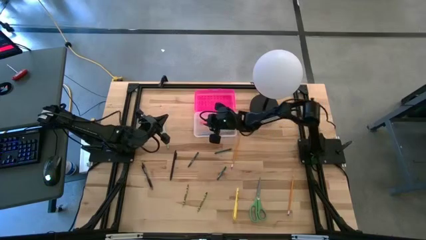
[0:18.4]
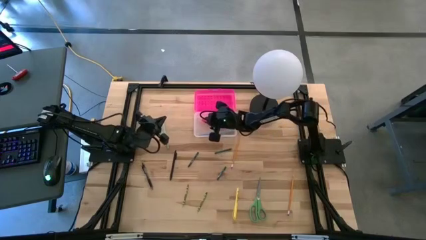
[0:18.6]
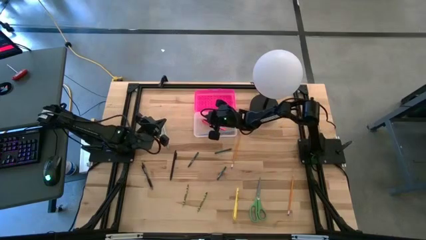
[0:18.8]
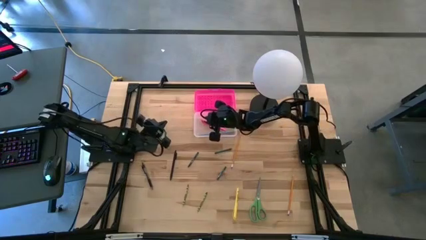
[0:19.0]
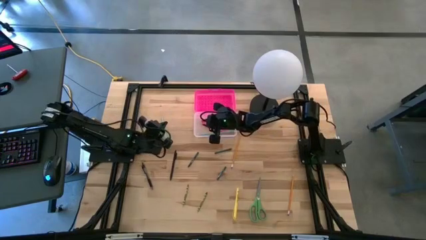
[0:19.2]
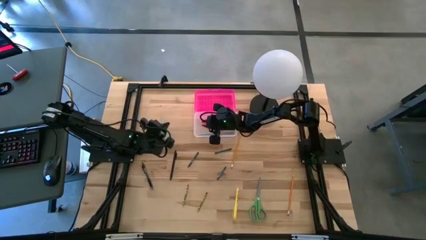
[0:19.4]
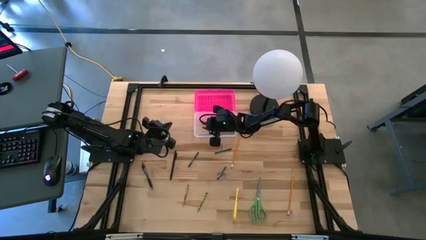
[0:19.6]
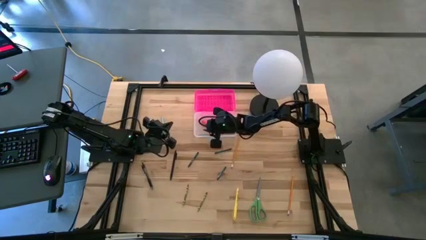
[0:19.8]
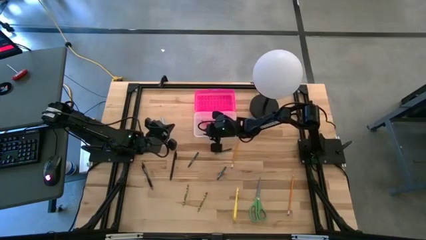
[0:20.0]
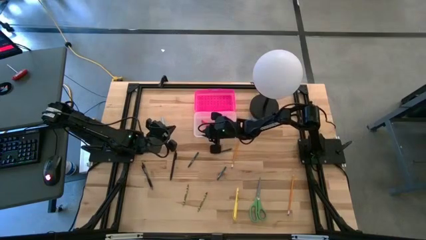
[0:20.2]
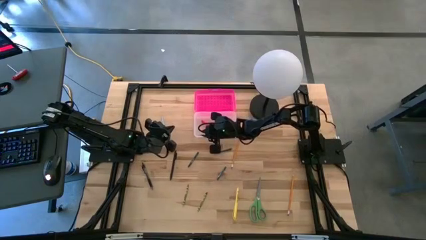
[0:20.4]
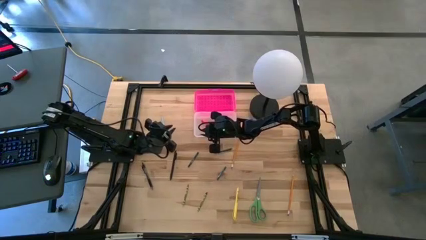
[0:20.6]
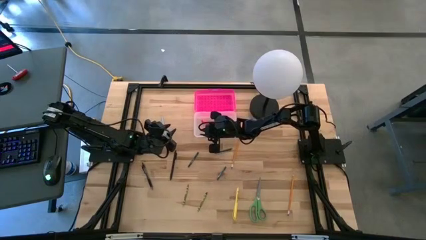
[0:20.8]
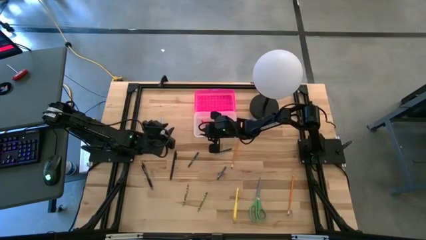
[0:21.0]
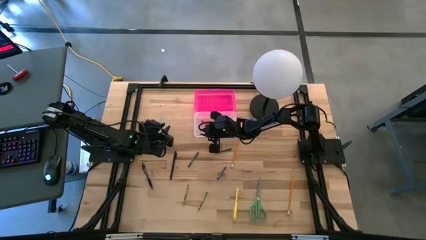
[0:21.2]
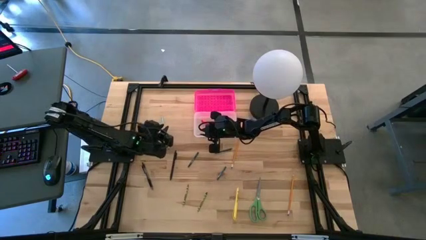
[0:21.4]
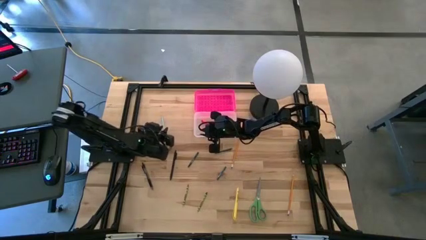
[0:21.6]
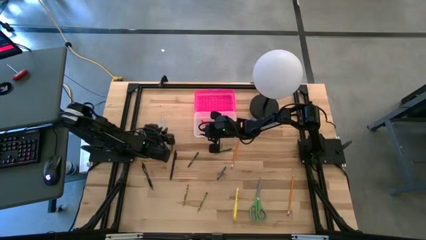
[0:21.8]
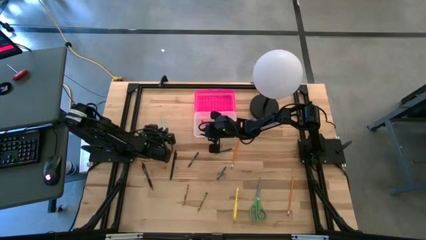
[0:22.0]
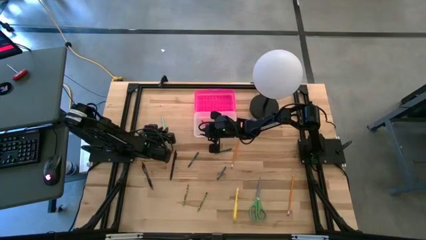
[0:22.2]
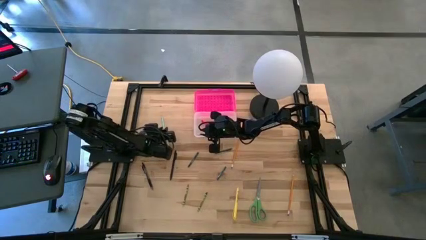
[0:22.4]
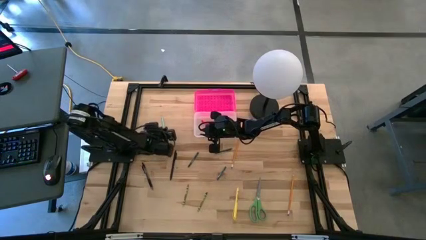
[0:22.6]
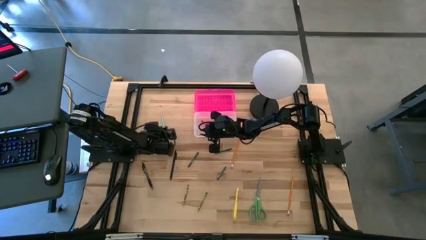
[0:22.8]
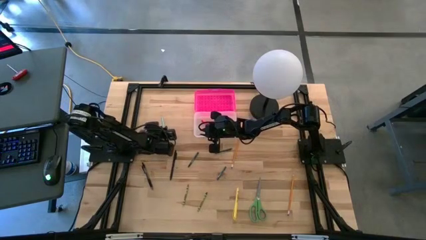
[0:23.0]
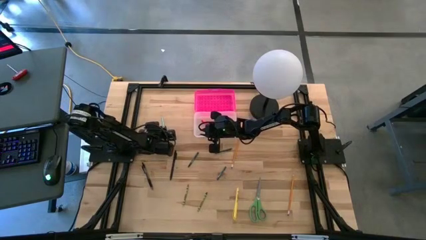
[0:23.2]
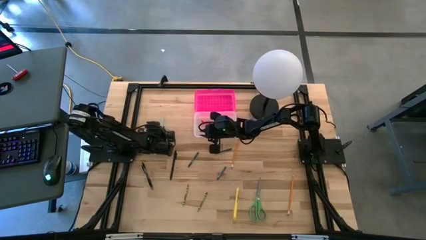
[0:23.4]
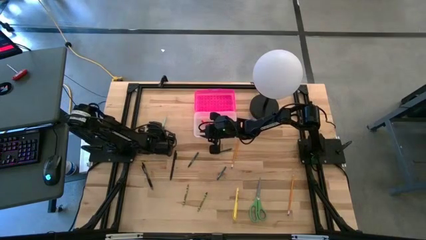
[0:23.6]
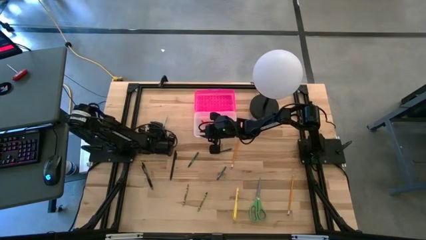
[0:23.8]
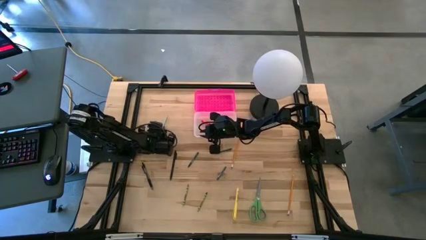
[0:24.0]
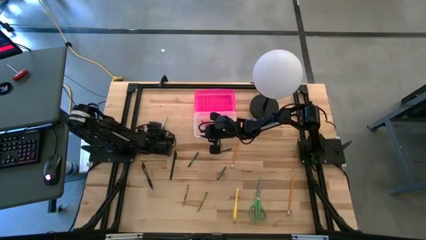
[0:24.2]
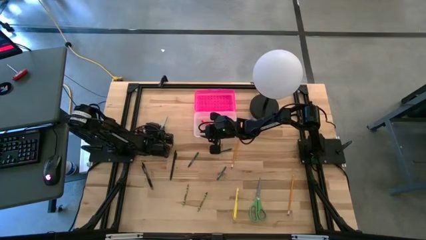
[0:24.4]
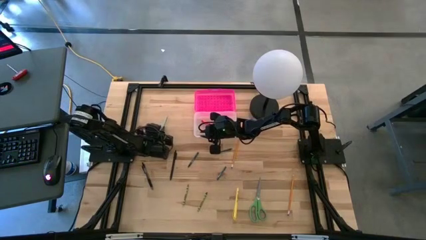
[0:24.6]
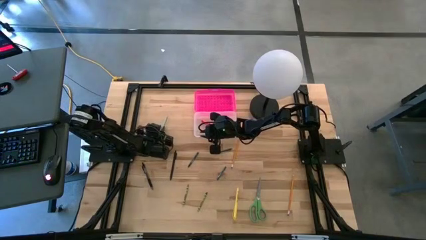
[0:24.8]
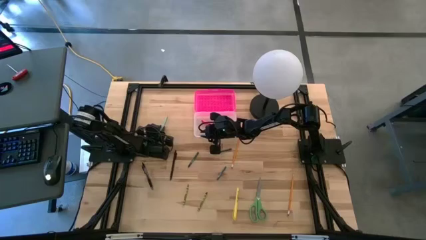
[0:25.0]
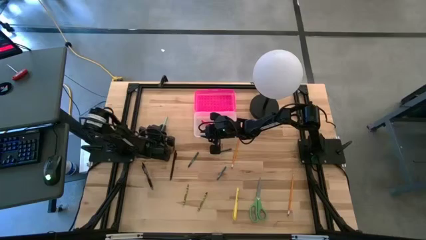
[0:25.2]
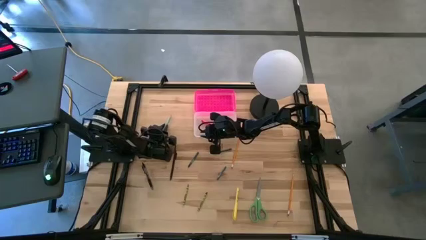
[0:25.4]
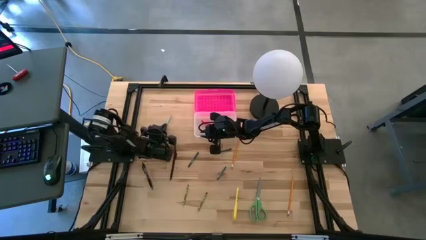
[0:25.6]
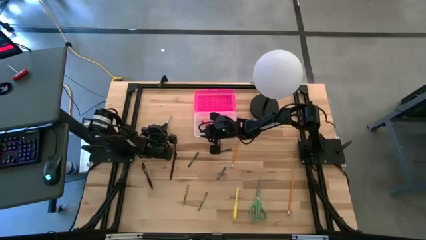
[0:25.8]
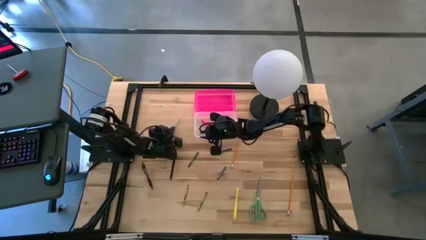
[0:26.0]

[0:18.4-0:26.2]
Task: Pick & place school supplies into a supply box
Put the light blue pencil into the transparent supply box

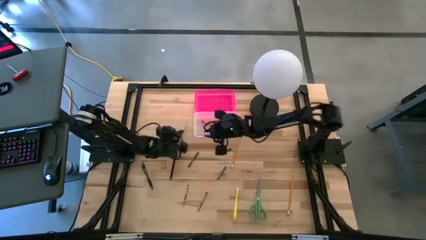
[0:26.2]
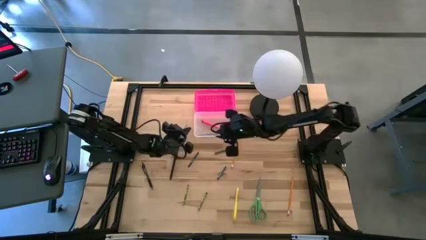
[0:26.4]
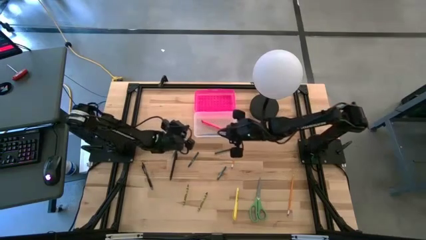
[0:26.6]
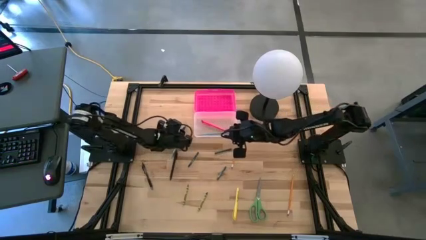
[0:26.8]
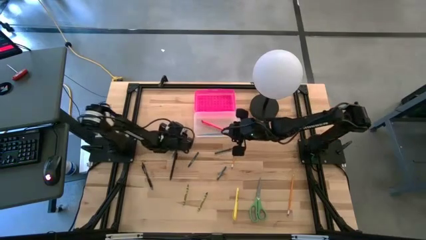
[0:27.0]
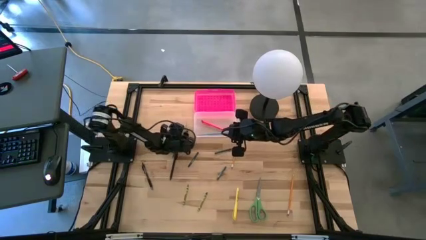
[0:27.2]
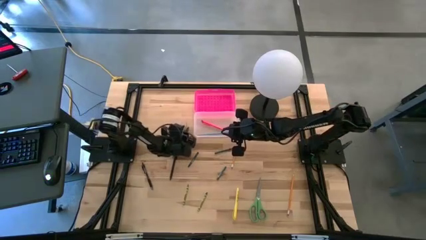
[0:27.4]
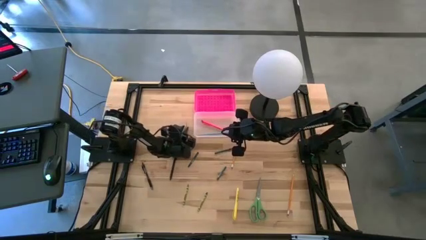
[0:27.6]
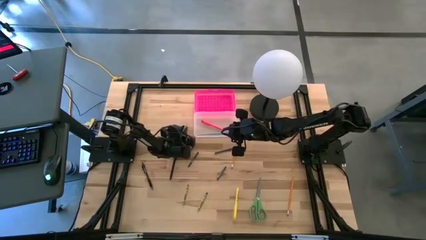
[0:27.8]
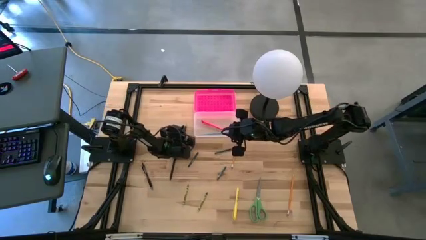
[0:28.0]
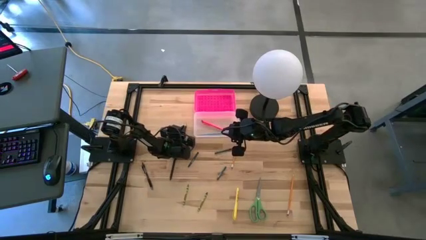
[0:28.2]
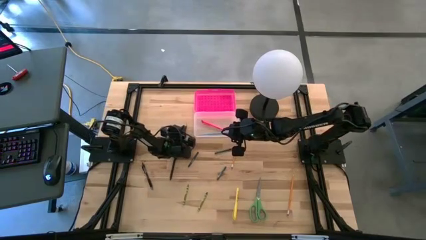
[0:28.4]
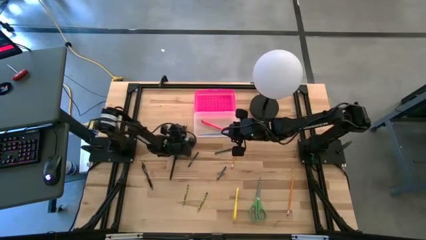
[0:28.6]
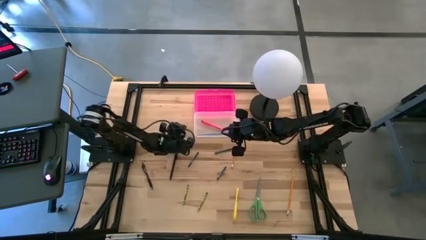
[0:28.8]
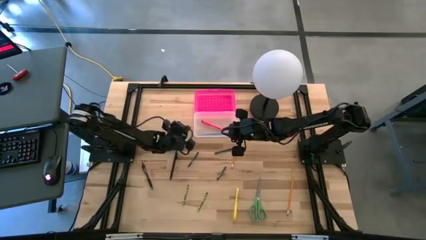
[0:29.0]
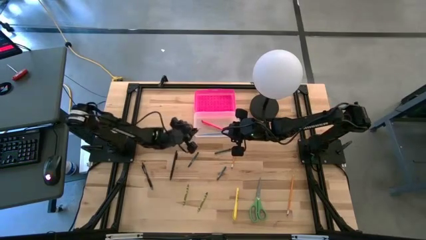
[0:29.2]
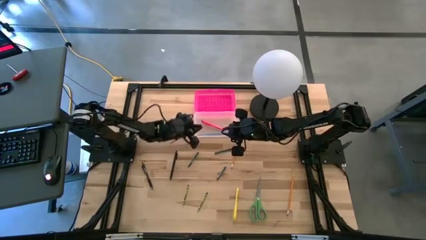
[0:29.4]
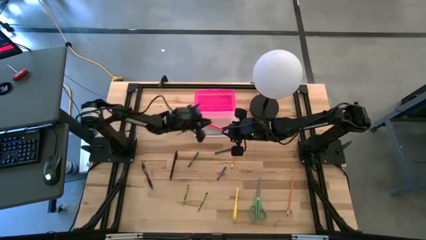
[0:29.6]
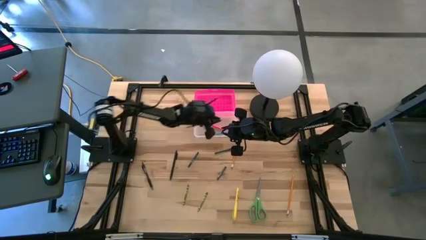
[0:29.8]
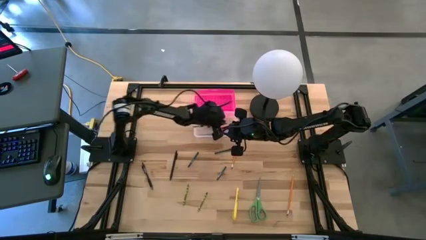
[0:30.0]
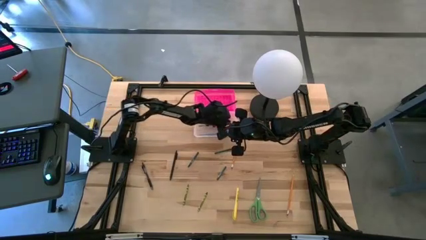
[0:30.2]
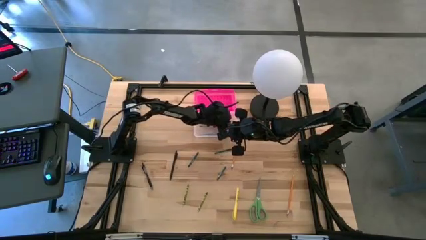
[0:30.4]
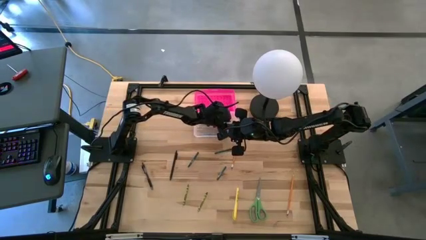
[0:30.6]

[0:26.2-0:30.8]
Put the light blue pencil into the transparent supply box
